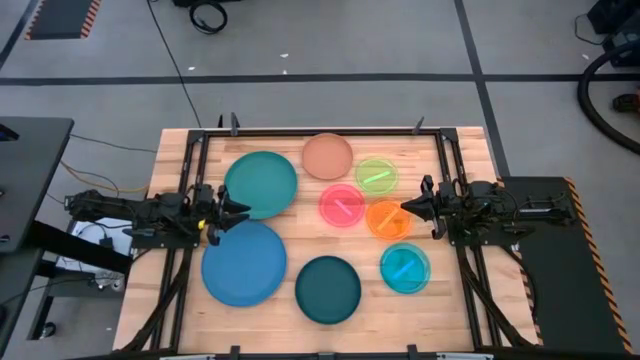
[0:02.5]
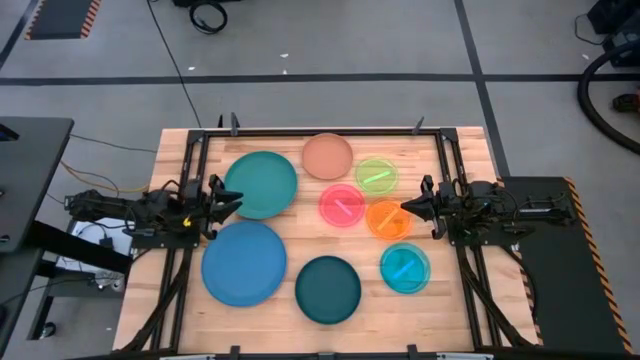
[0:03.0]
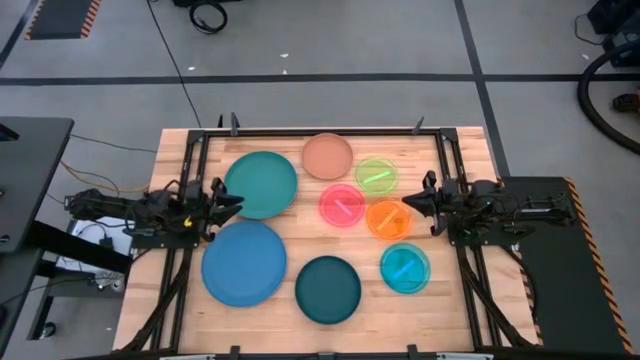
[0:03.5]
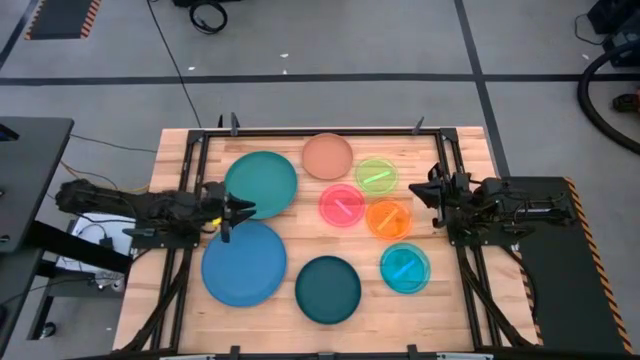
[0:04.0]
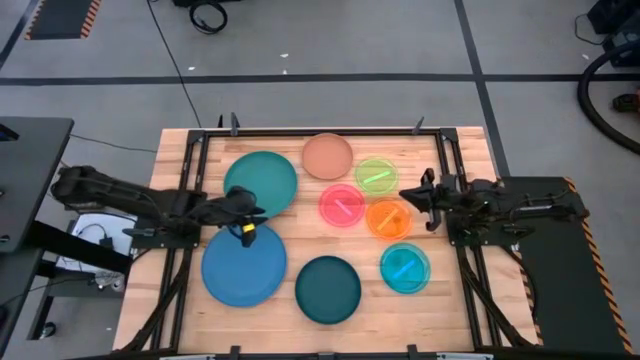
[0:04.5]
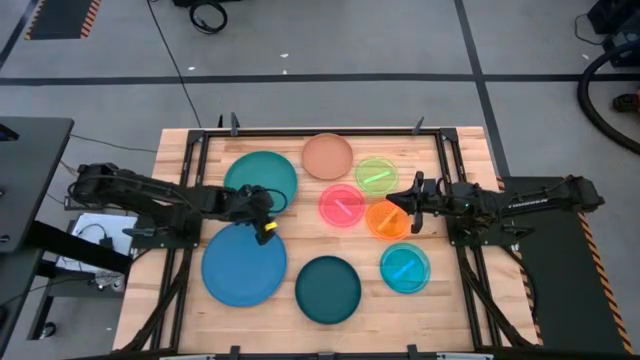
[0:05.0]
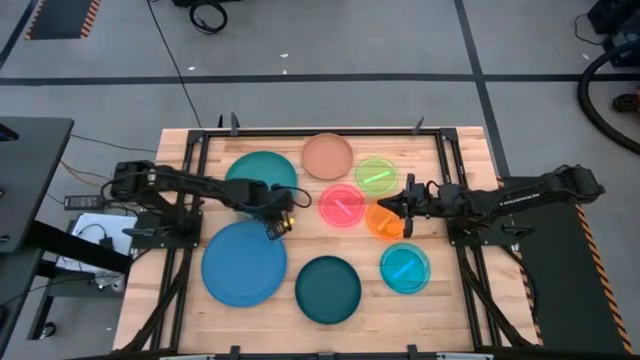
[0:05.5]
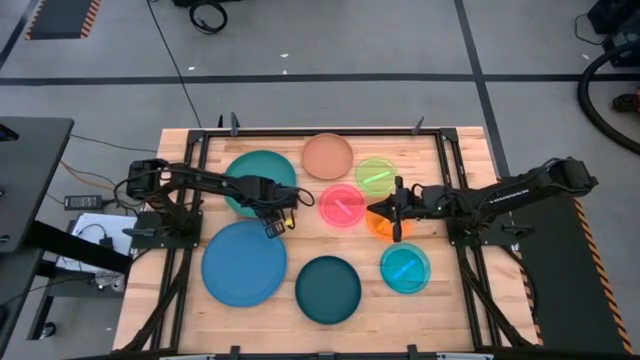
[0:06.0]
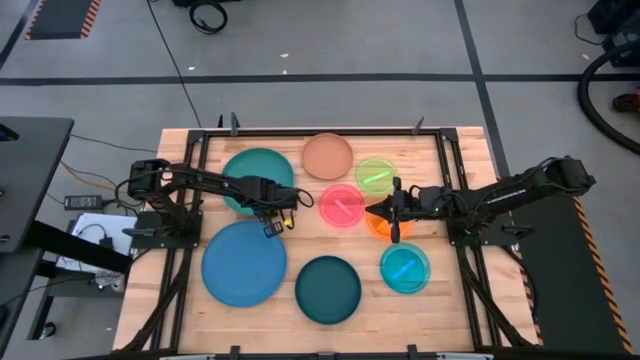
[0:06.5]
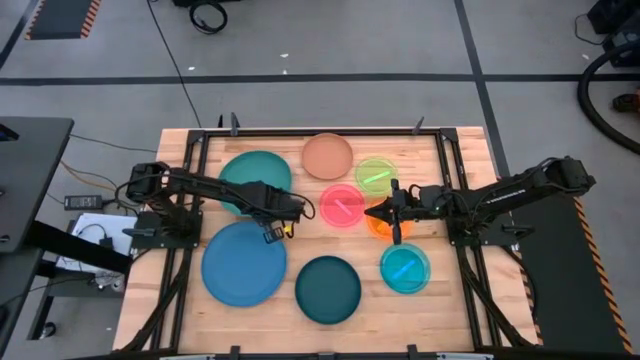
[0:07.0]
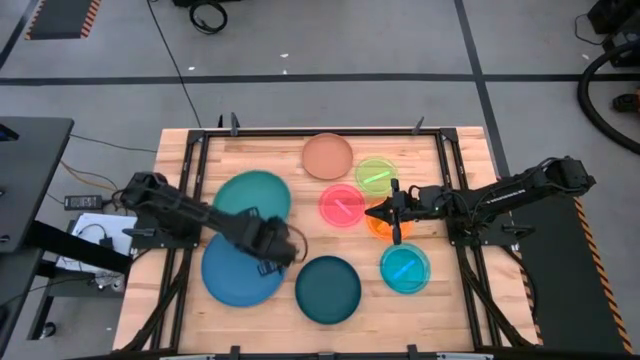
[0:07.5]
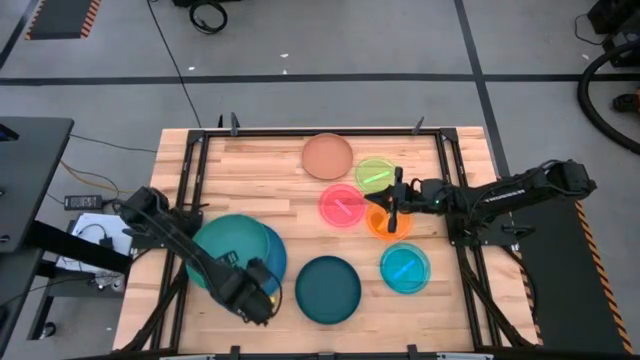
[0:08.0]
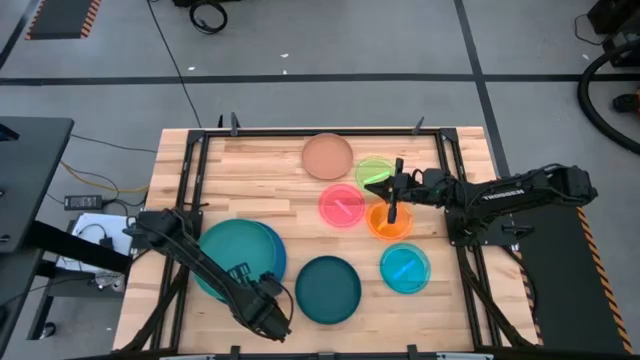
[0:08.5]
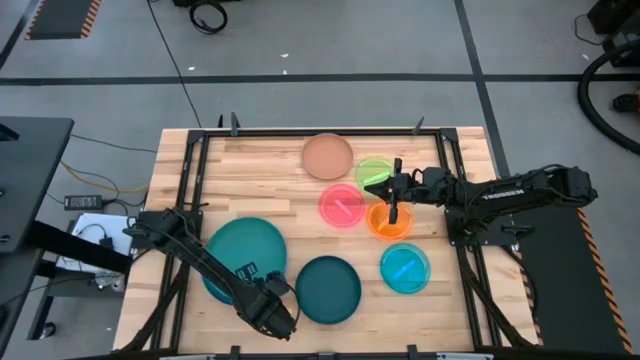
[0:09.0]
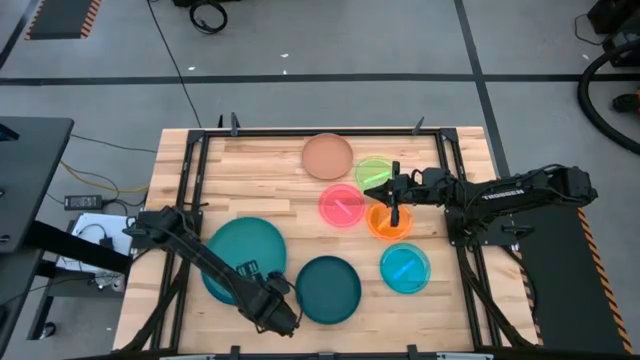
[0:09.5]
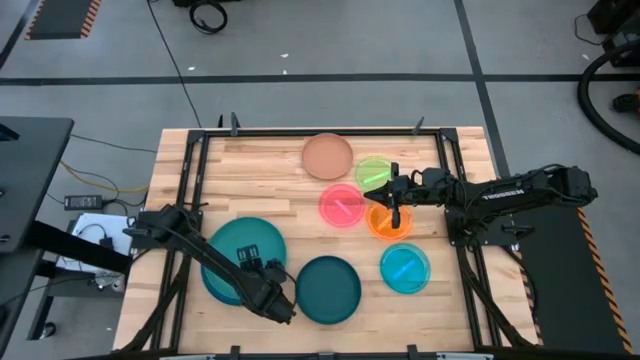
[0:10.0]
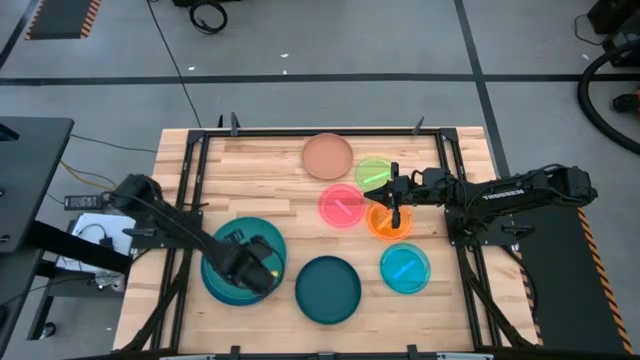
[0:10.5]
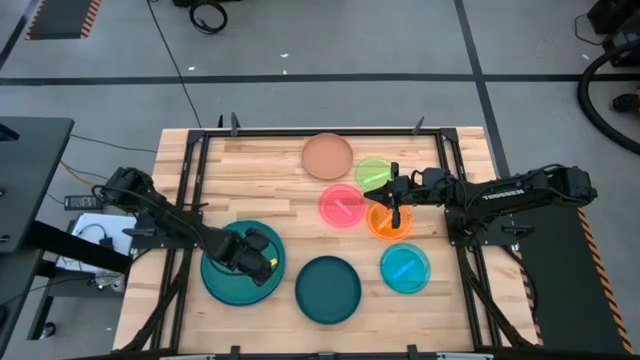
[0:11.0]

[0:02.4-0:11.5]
Task: Stack plastic plates
Stack the green plate on top of the blue plate

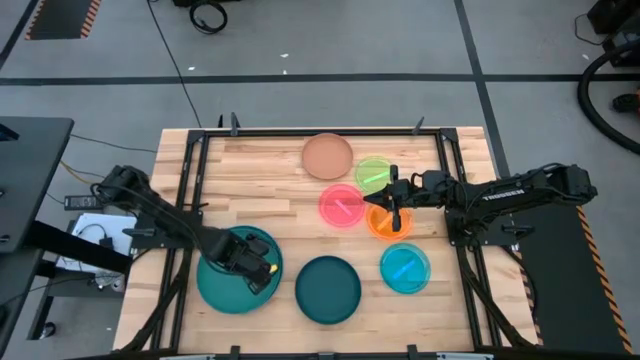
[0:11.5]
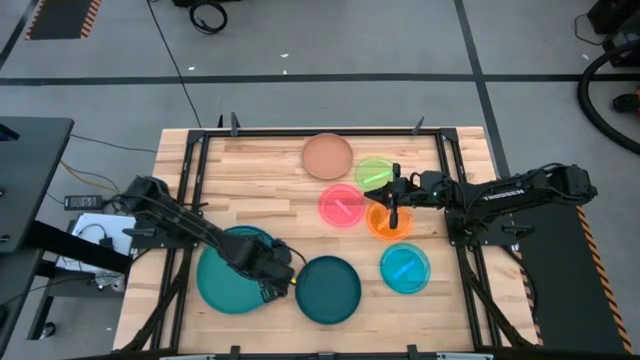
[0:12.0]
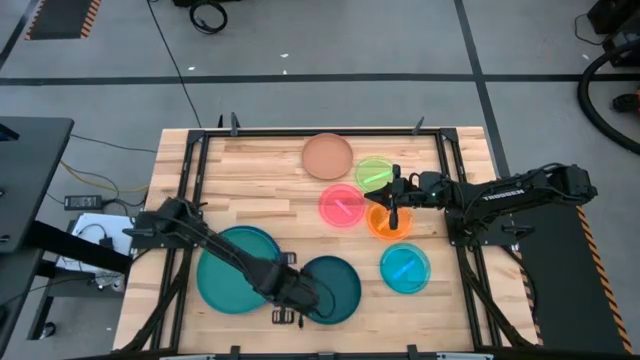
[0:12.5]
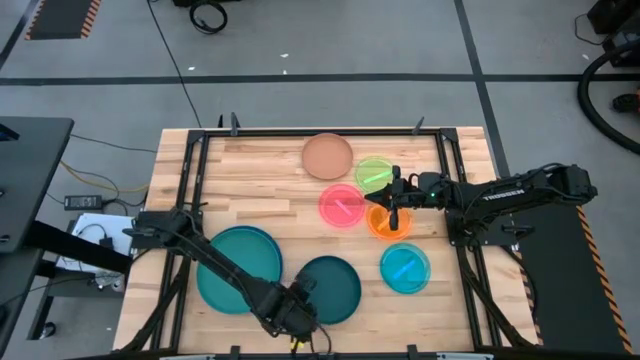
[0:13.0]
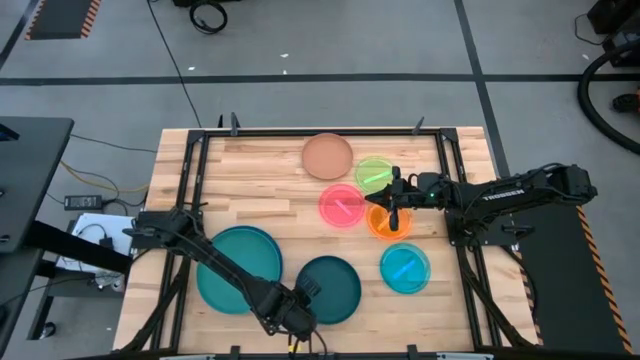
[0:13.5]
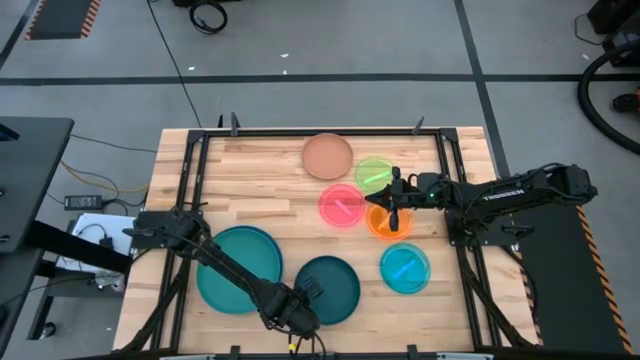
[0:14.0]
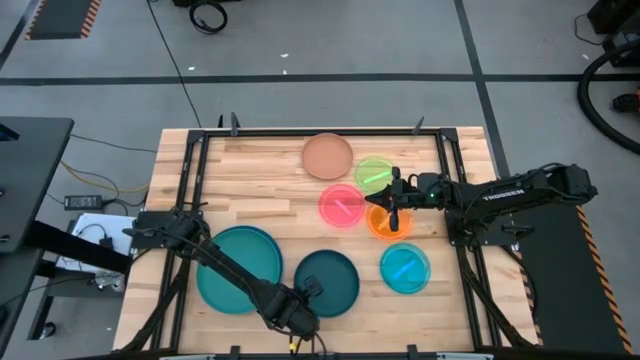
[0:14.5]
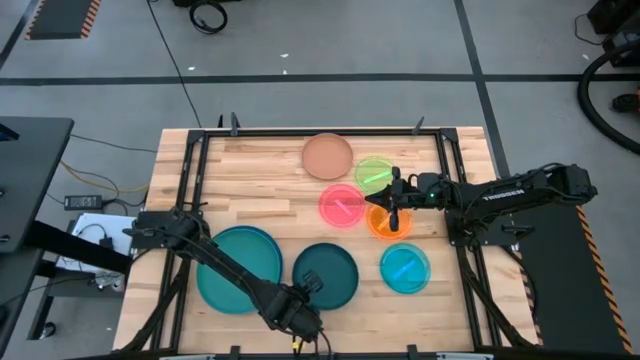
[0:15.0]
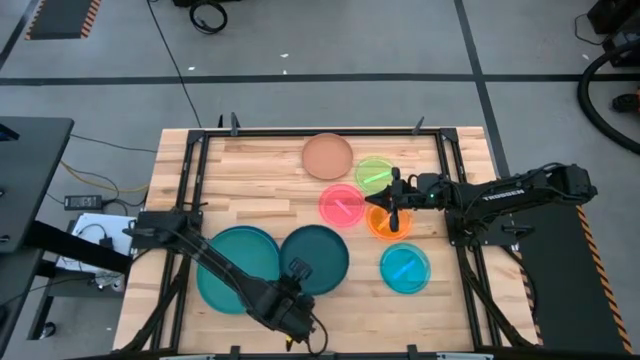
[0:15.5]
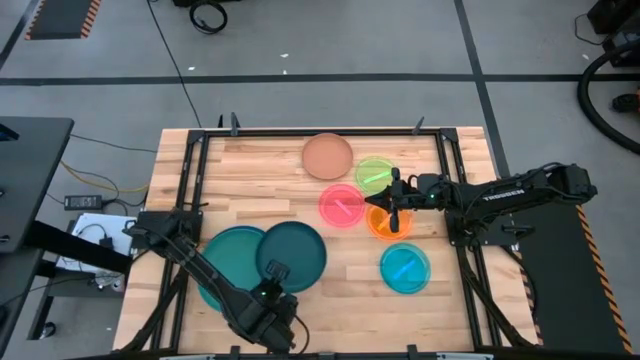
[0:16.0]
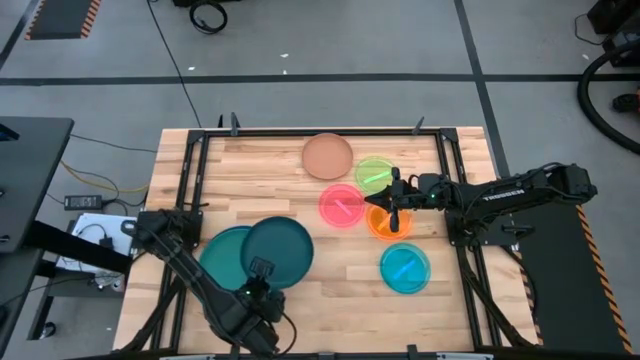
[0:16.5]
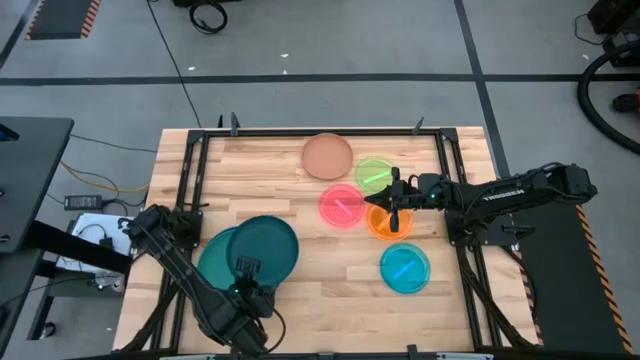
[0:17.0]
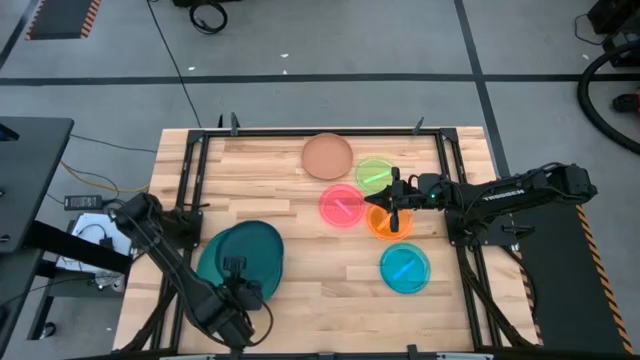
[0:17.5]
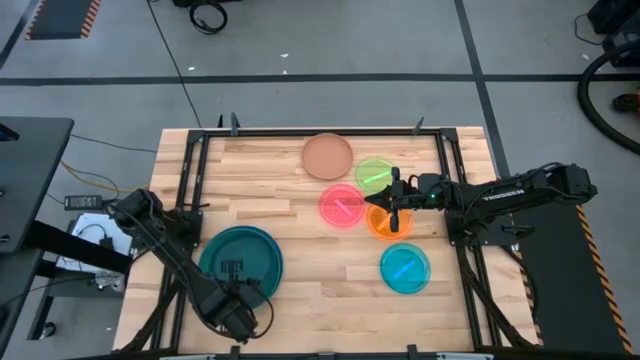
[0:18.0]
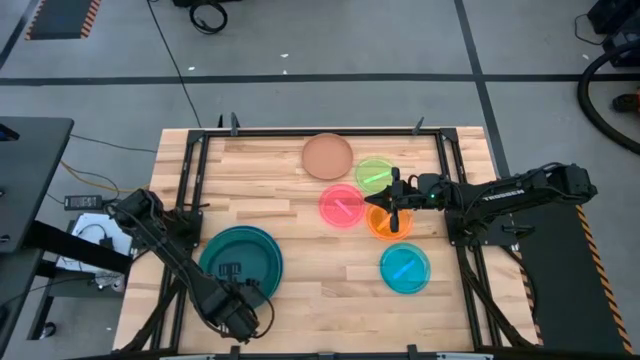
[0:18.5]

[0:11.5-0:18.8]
Stack the dark green plate on top of the green plate

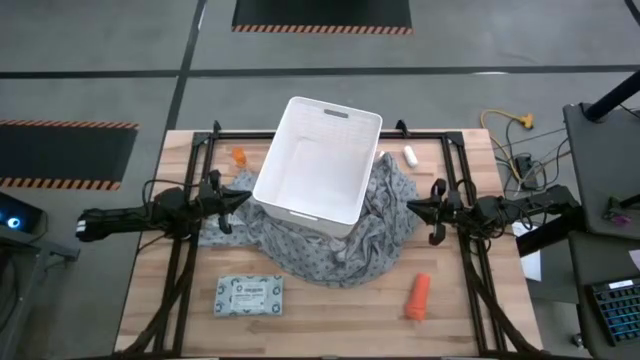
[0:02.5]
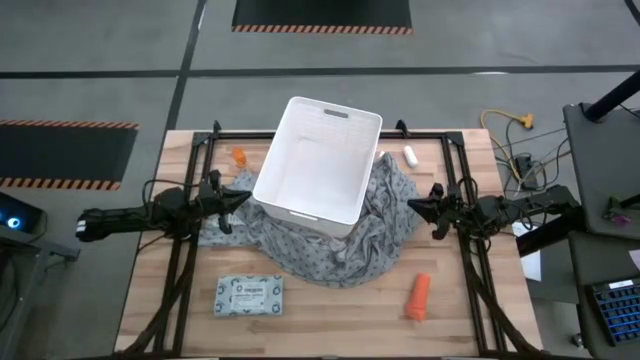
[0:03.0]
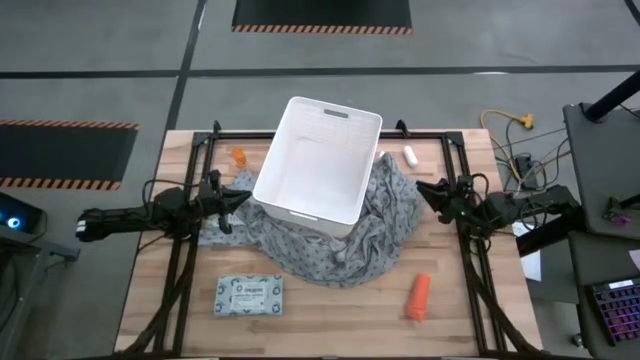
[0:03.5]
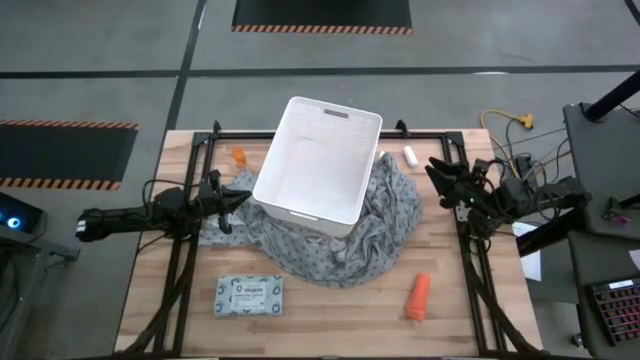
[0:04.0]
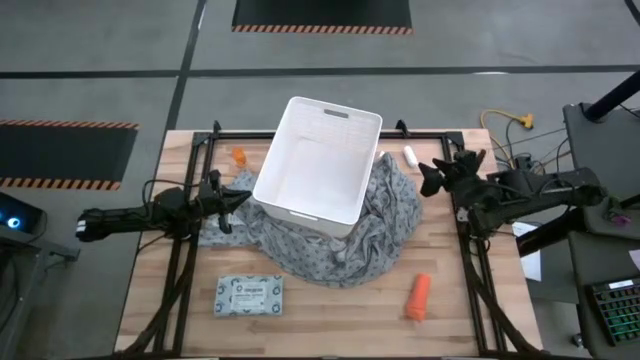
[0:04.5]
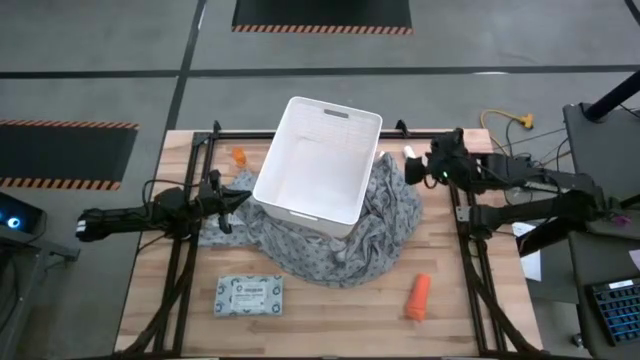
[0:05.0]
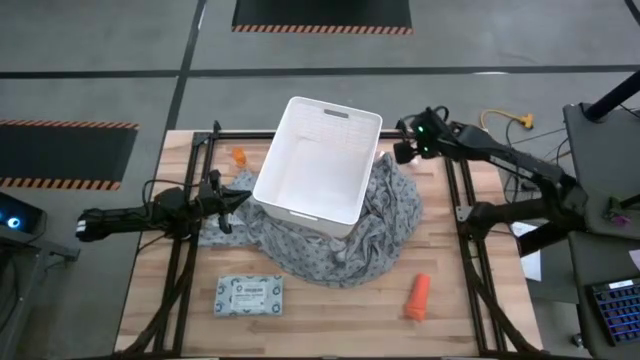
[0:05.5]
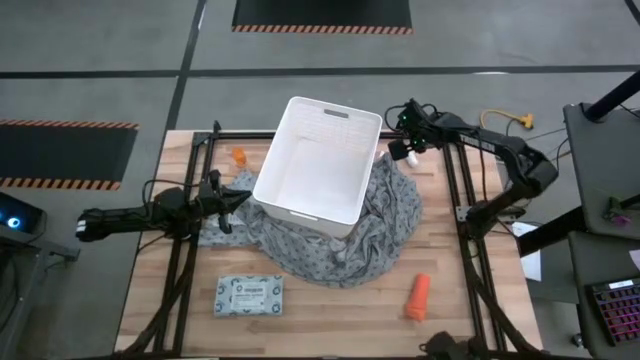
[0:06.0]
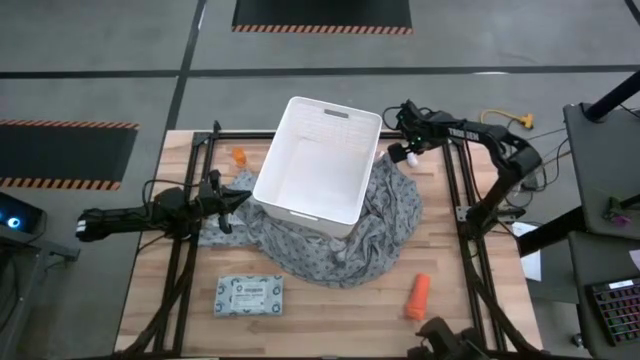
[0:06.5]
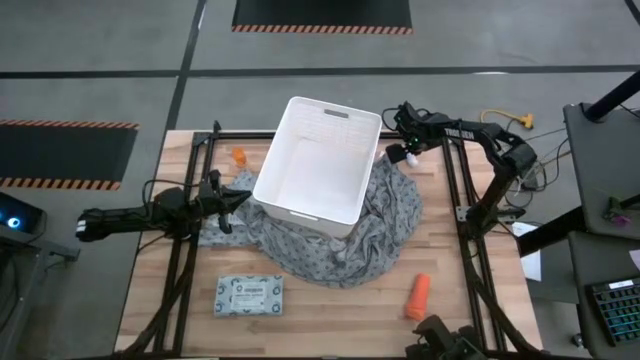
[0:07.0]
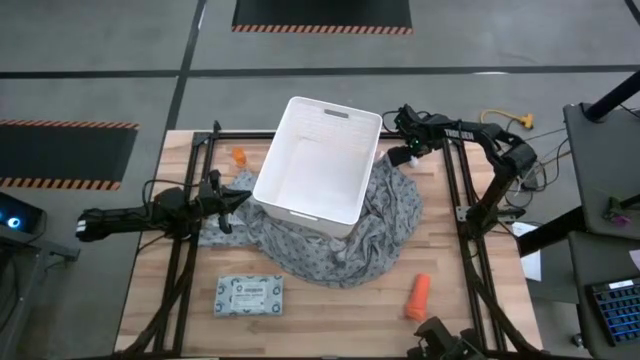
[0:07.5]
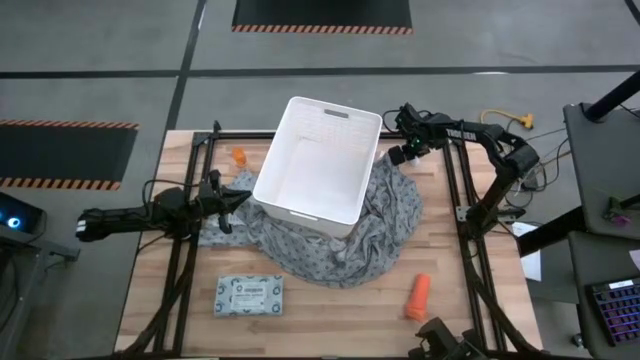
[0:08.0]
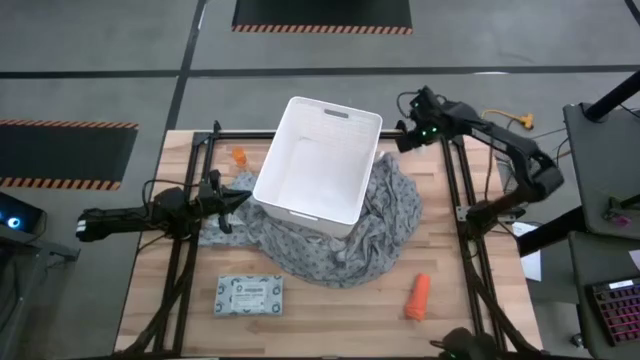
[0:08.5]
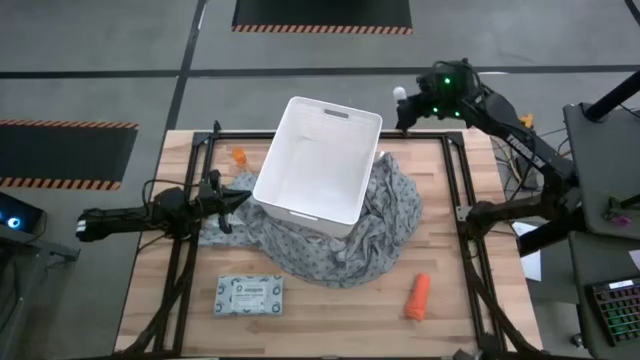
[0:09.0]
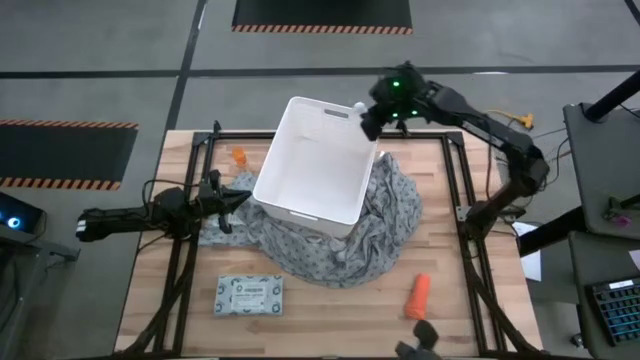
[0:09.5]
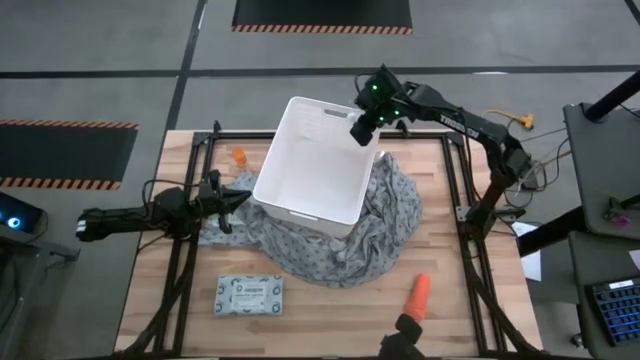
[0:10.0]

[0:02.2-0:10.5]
Task: Pick & place medical supplies in basket/bin
Put the white rolled gauze into the white bin
